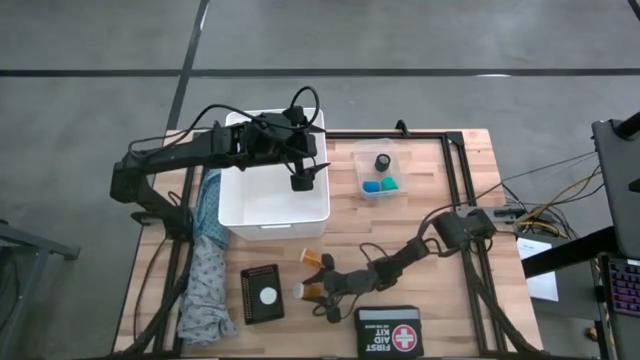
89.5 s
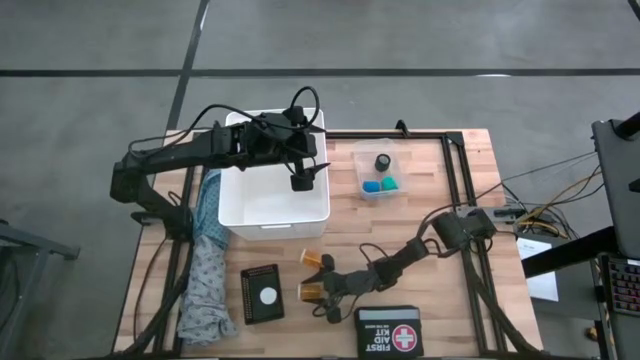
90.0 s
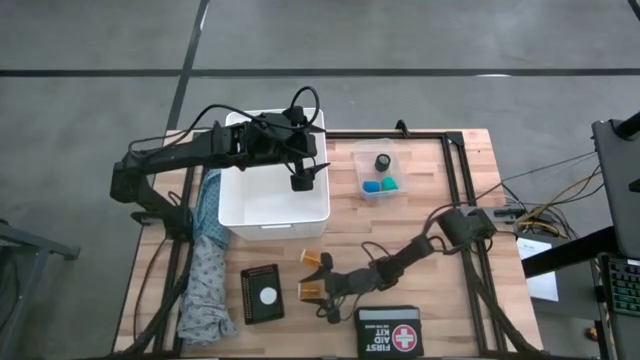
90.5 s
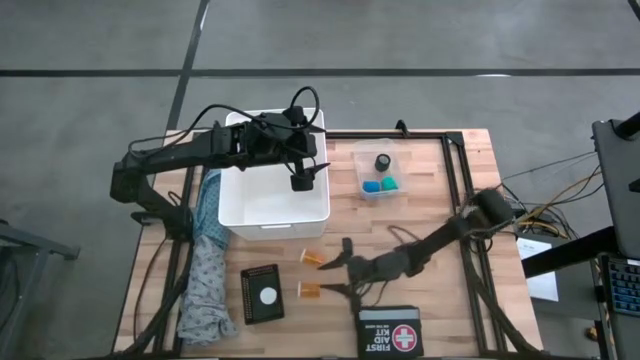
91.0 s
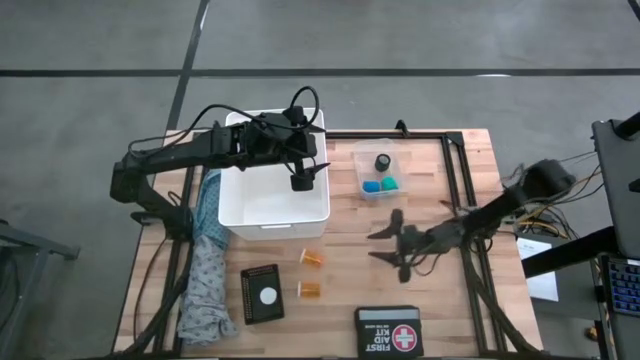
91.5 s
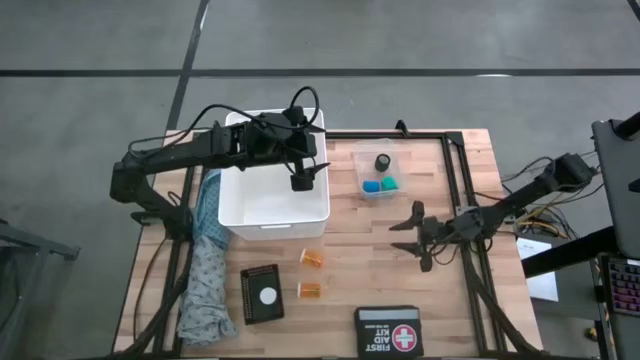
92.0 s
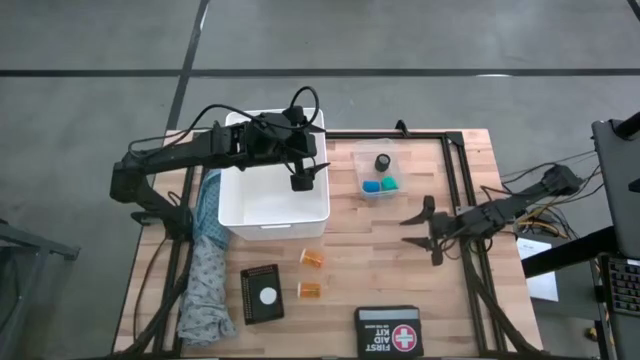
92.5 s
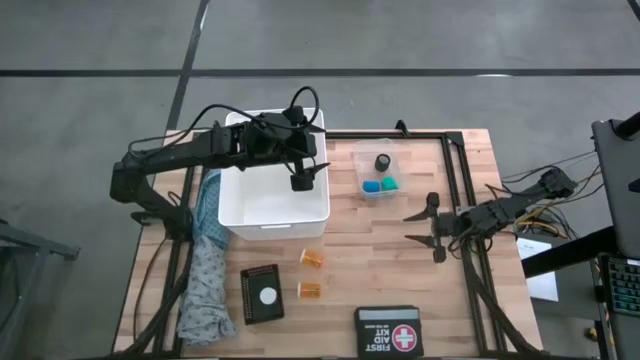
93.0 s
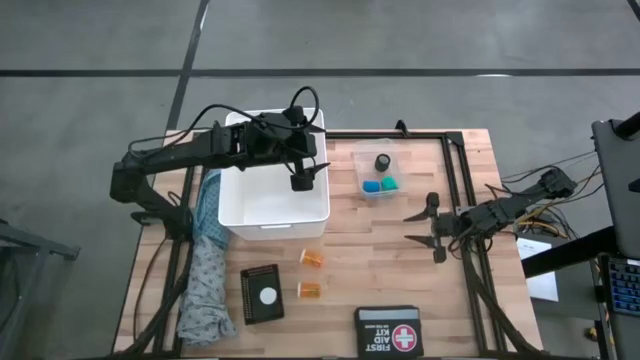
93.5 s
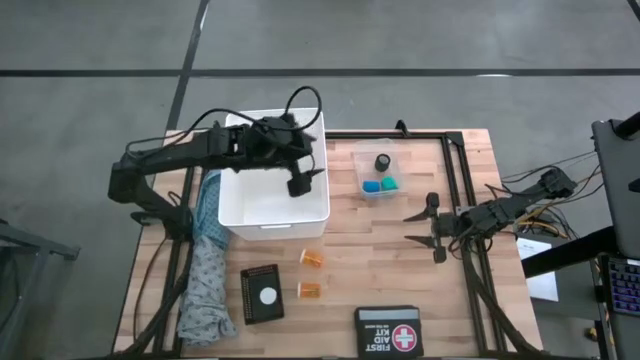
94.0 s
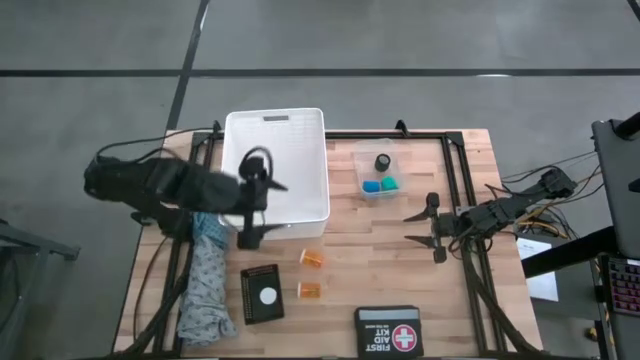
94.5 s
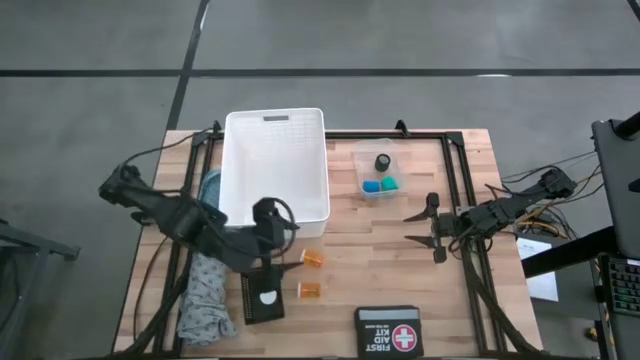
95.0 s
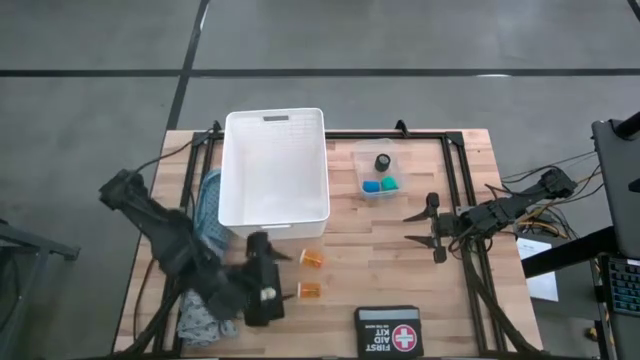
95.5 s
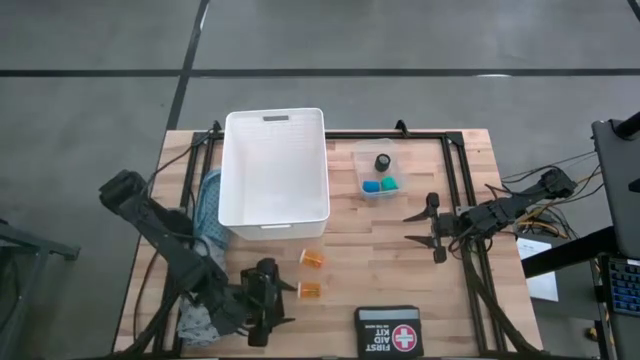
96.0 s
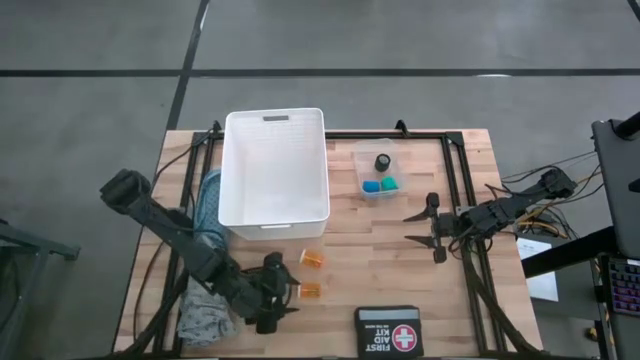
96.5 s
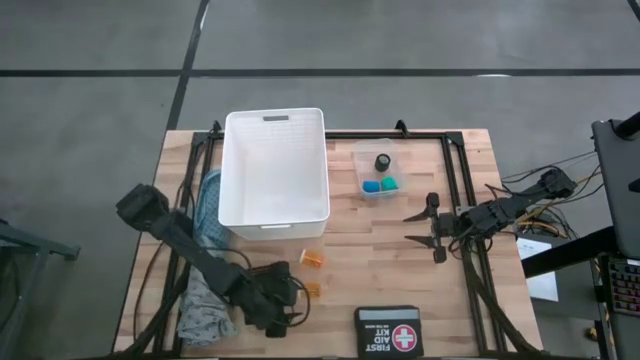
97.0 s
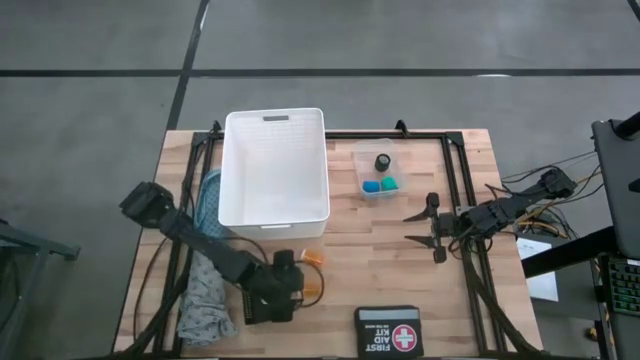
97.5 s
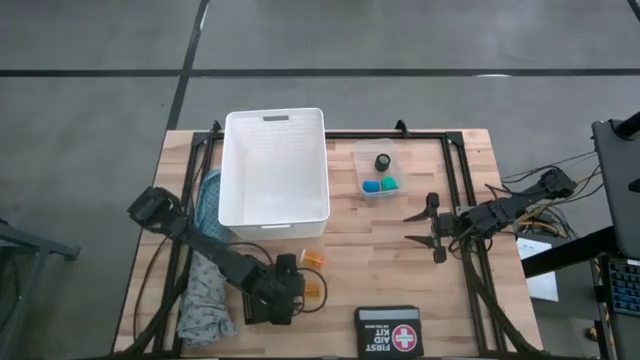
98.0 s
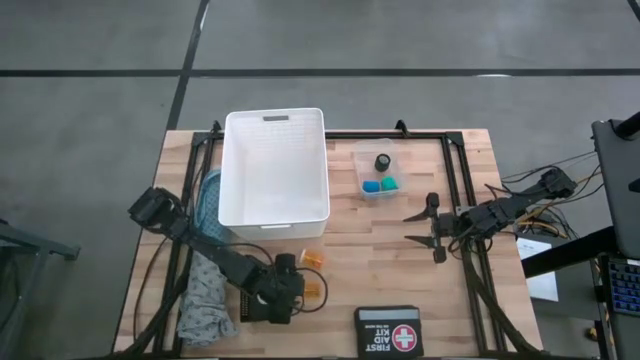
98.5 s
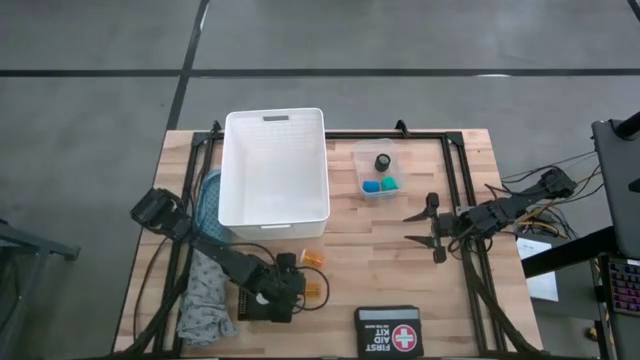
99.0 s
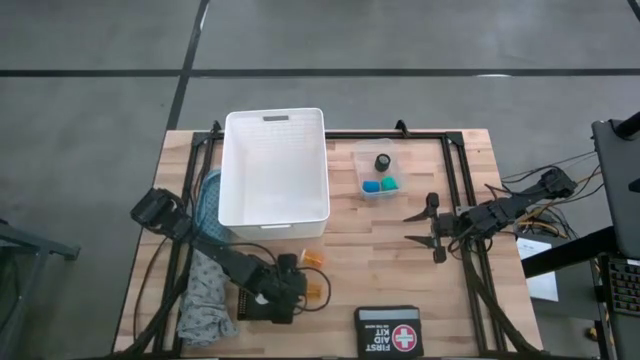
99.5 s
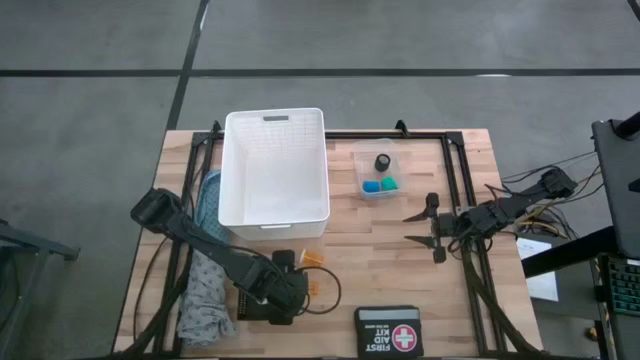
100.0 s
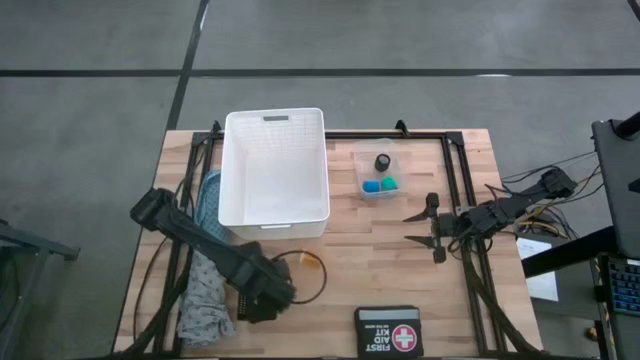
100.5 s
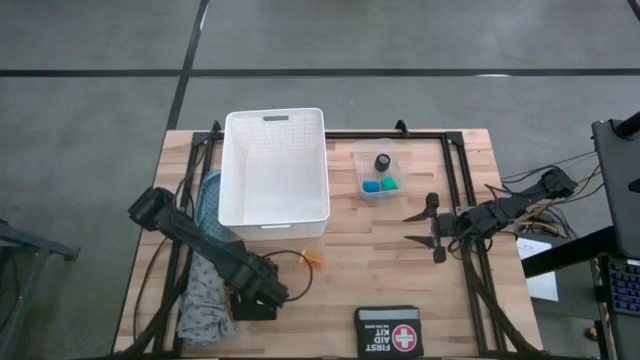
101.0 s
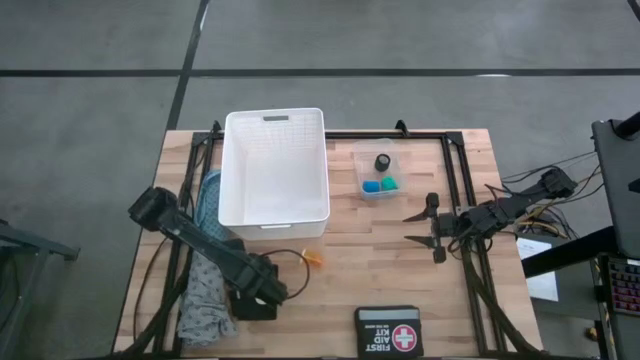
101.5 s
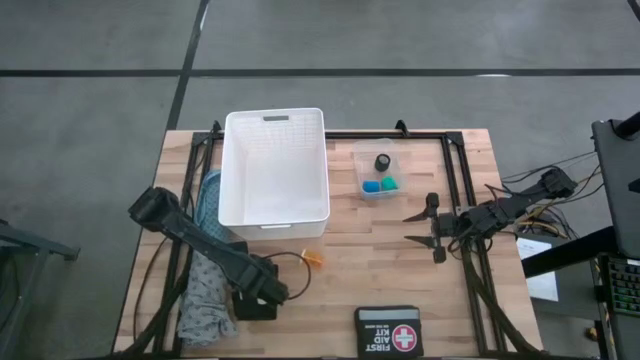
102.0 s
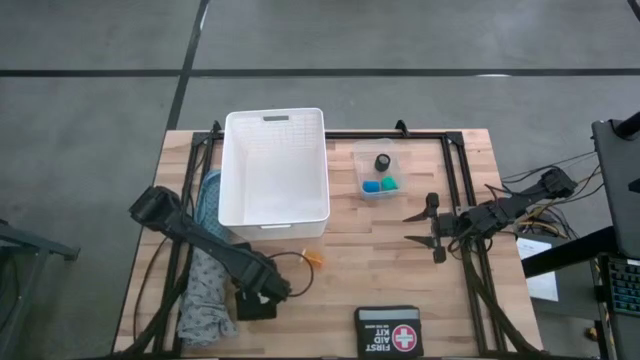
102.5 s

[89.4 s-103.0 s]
Task: Pick & place medical supplies in basket/bin
Put the top orange pill bottle into the black bin

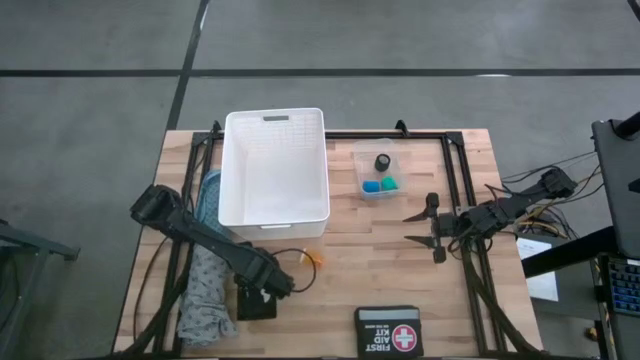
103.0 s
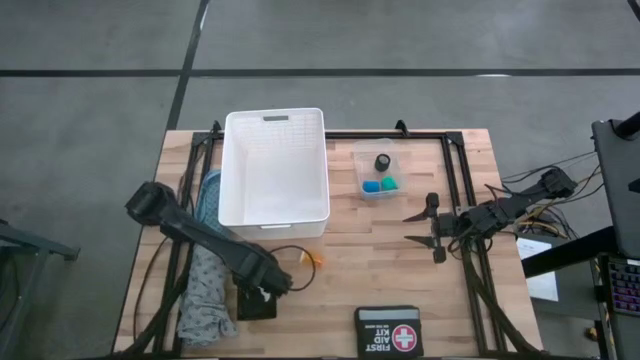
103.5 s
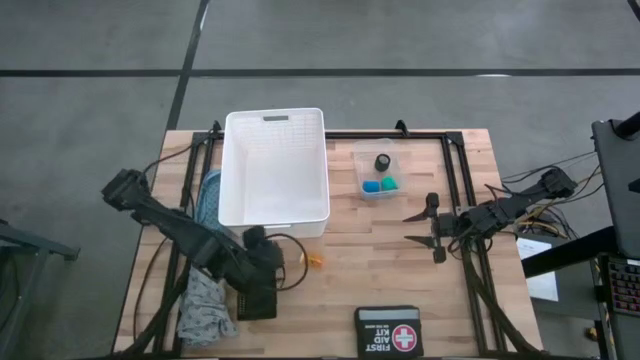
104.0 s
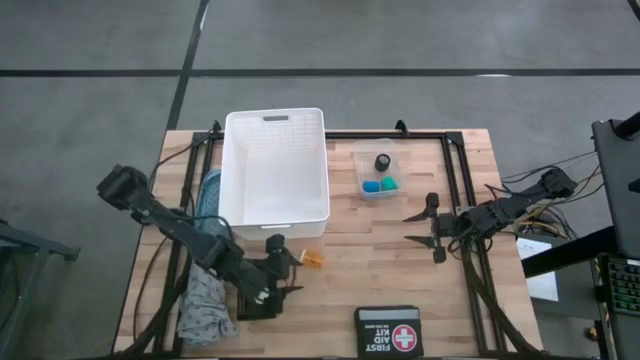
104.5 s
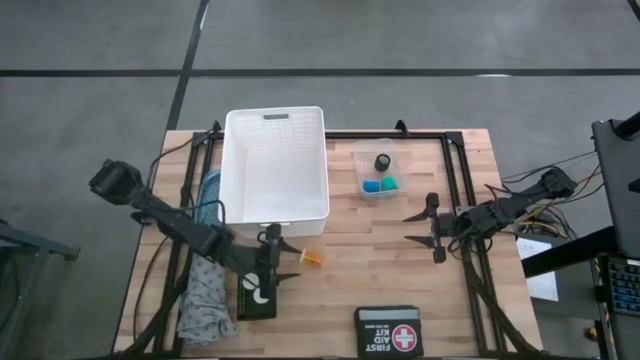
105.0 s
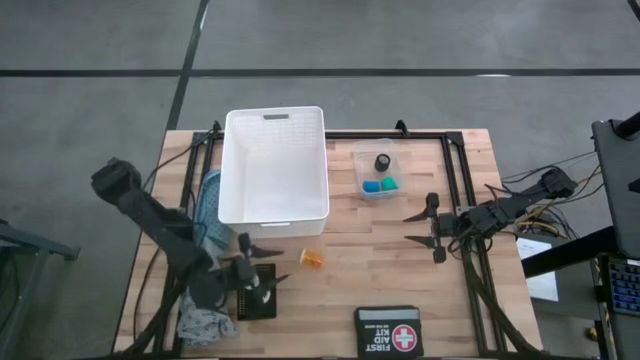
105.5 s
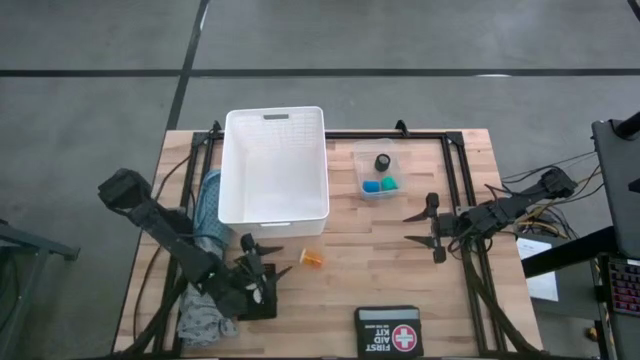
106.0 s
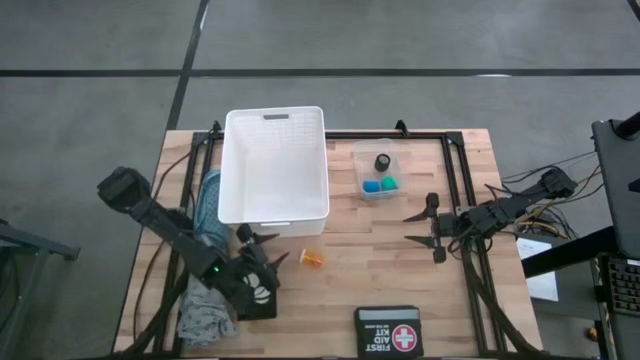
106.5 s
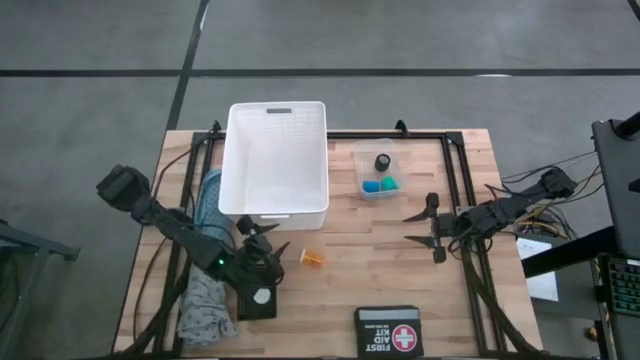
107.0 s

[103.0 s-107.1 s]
Adjust the white bin

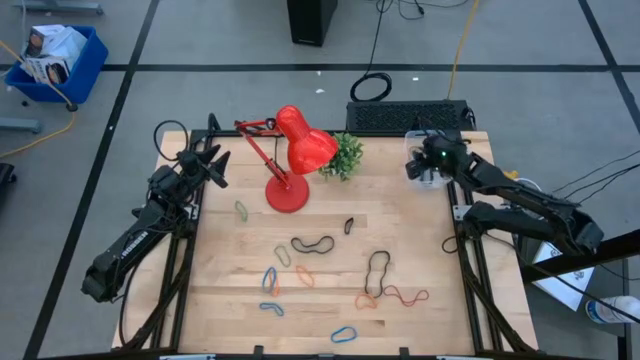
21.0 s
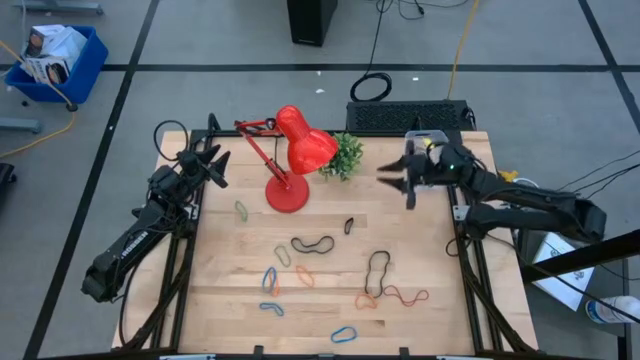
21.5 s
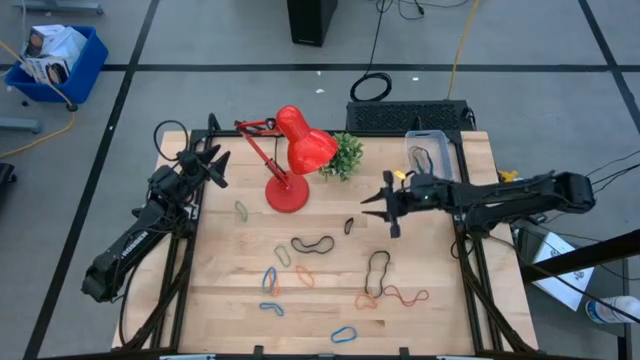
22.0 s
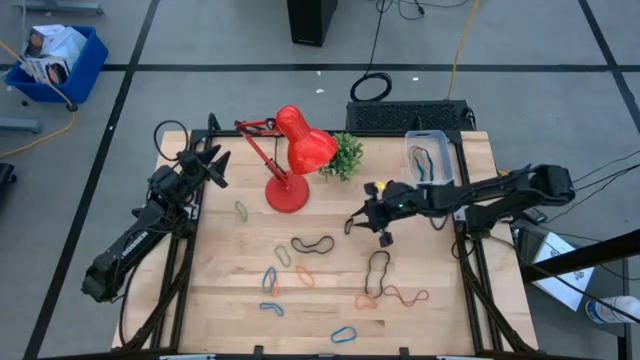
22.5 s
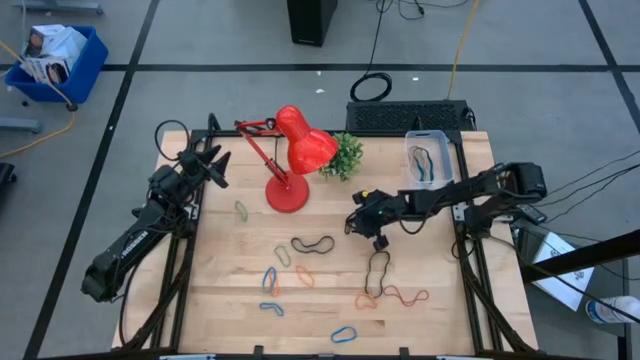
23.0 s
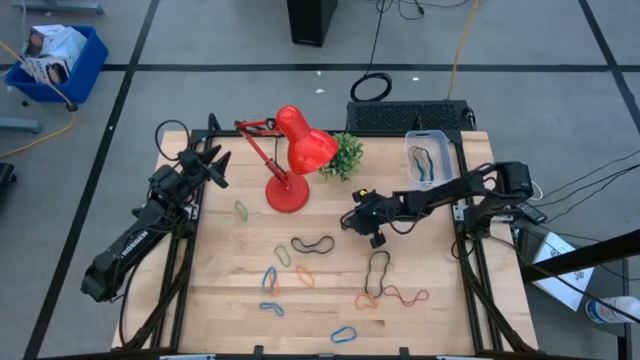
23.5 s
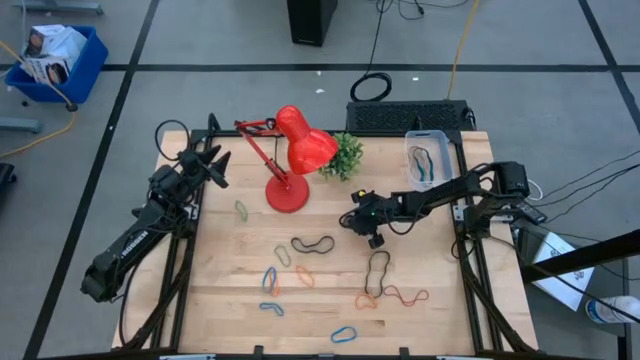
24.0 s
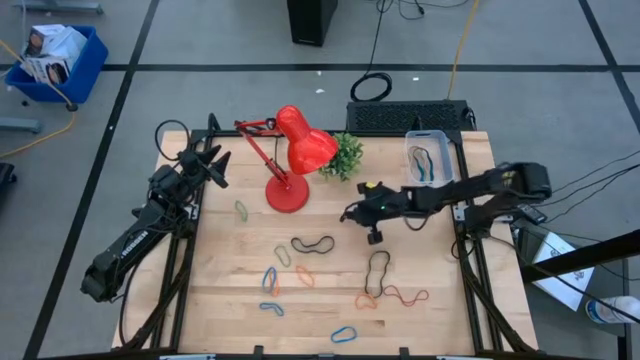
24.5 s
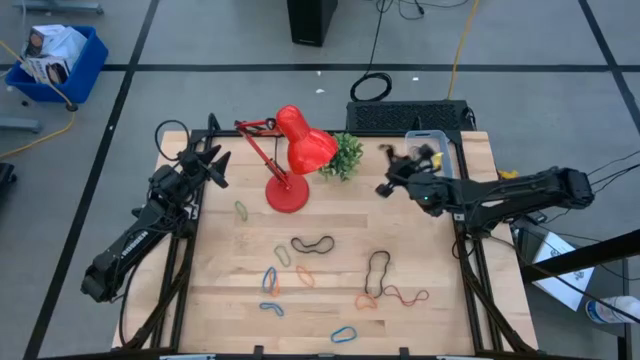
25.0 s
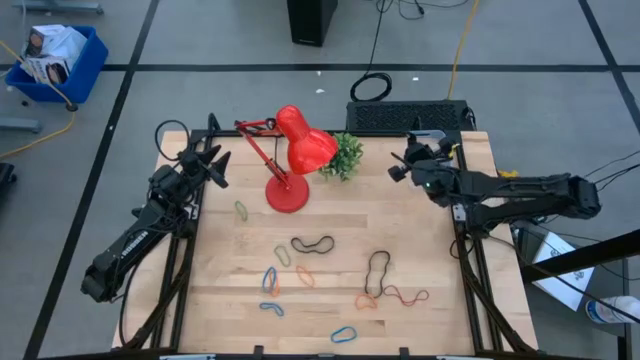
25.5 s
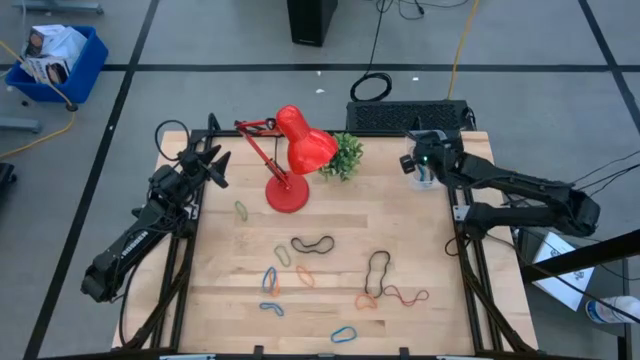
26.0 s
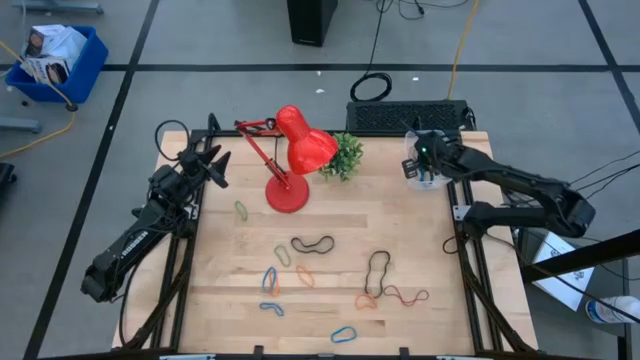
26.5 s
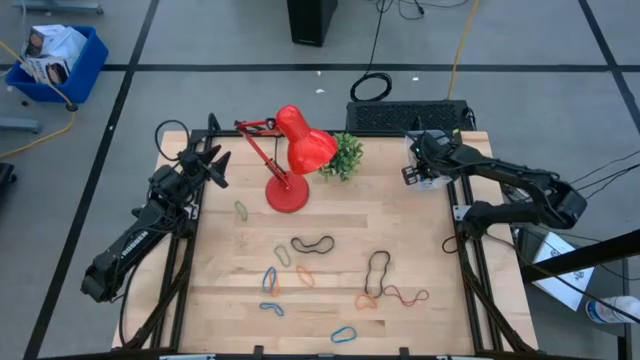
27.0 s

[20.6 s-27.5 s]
Task: Pick and place rubber bands into bin
Put the top black rubber band into the transparent bin
